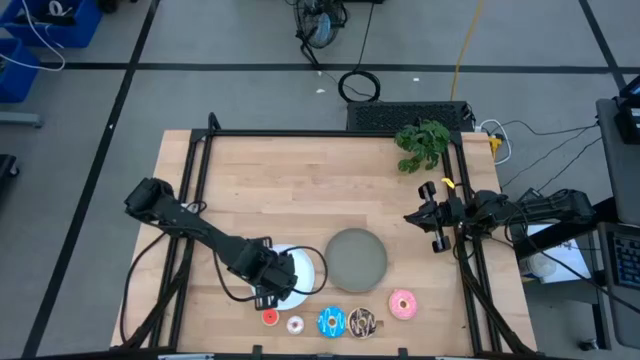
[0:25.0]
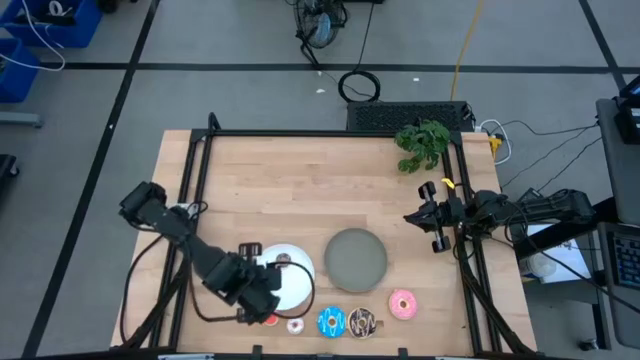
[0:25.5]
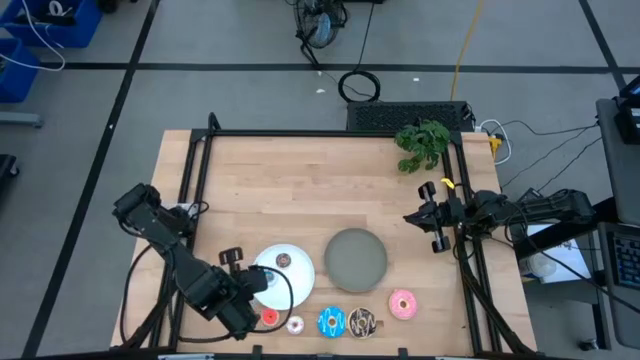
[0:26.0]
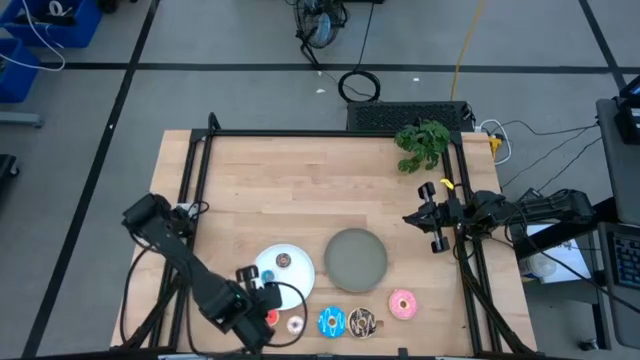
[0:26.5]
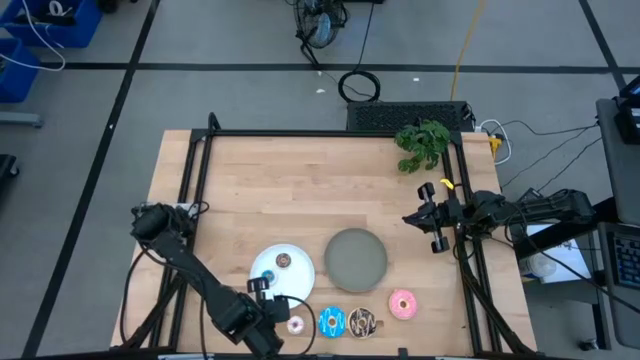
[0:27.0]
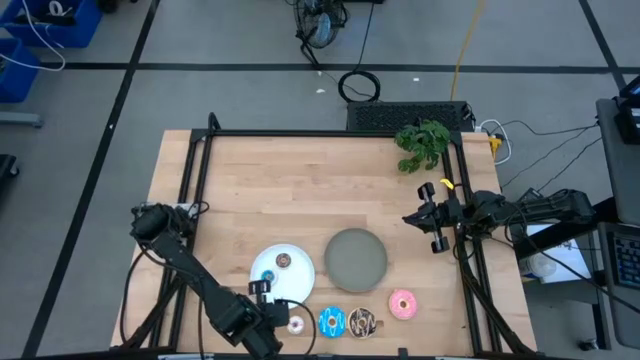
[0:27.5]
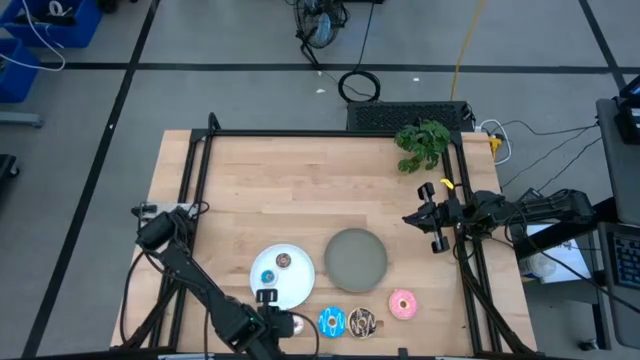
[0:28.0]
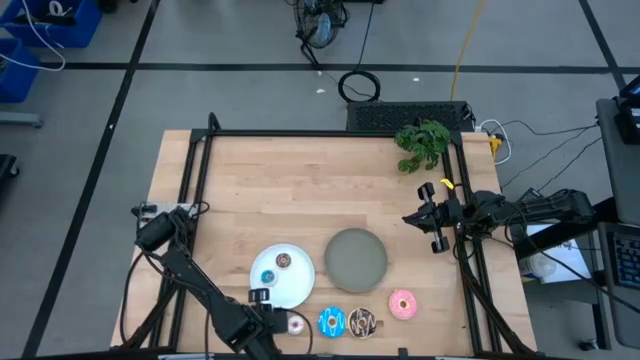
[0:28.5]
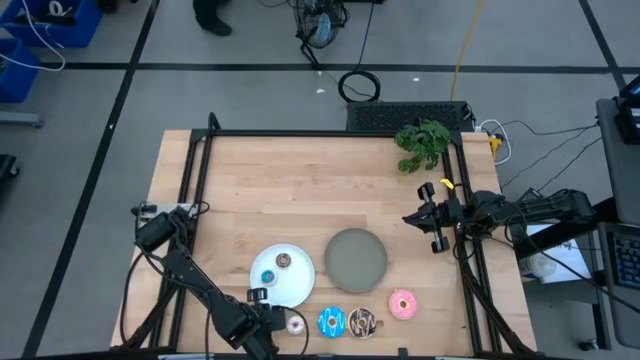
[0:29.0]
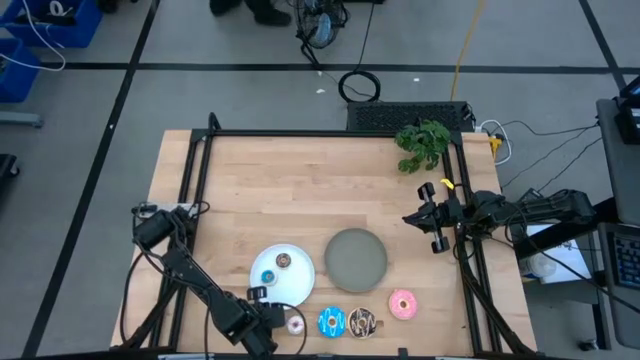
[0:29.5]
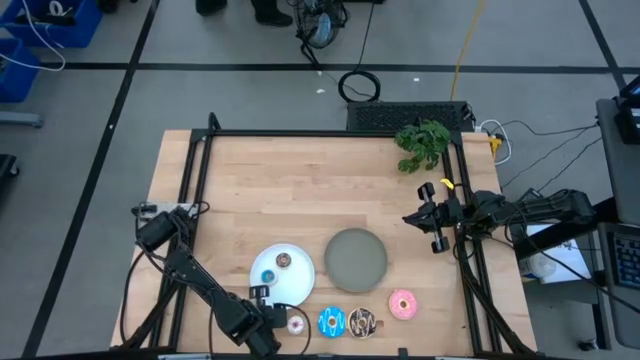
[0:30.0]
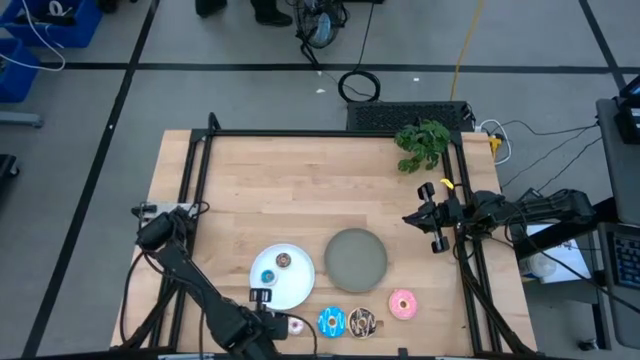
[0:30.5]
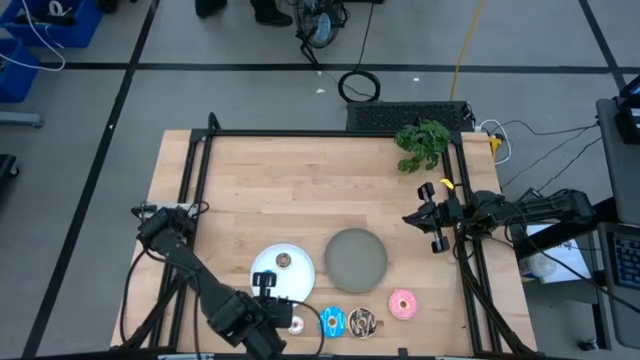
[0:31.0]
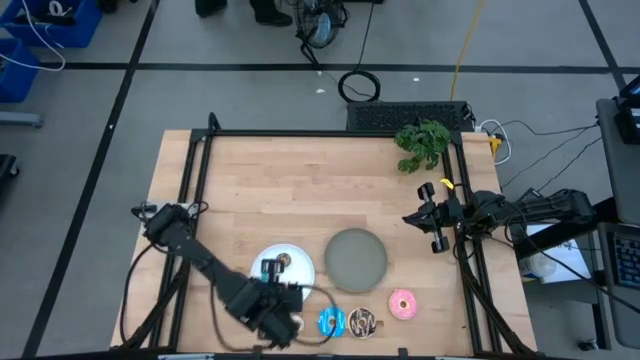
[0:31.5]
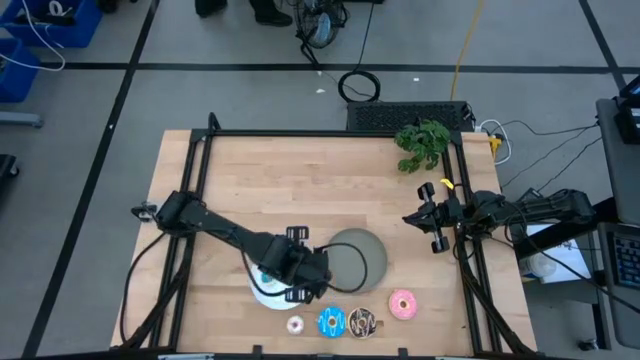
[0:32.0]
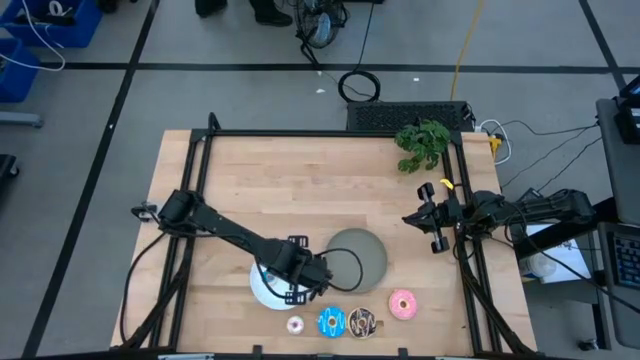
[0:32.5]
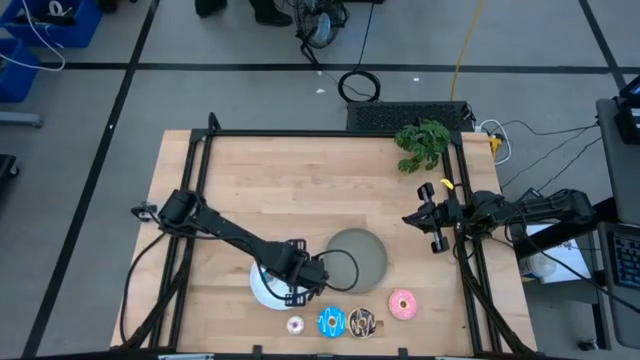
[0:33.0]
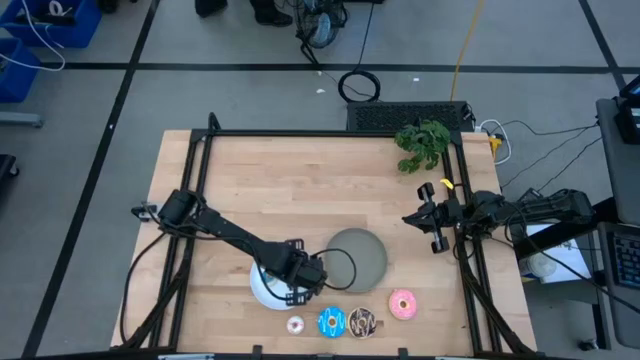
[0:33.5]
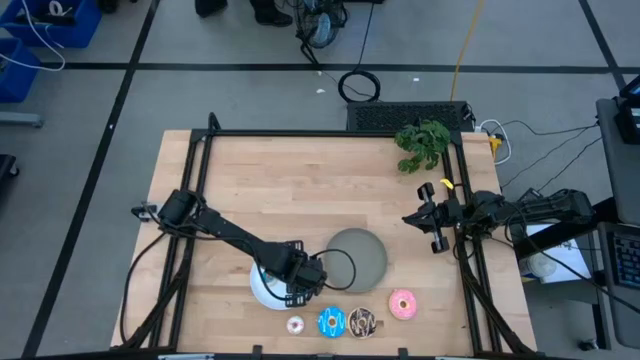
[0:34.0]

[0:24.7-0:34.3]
Task: Pick & Place donuts
Put the small orange donut on the white plate

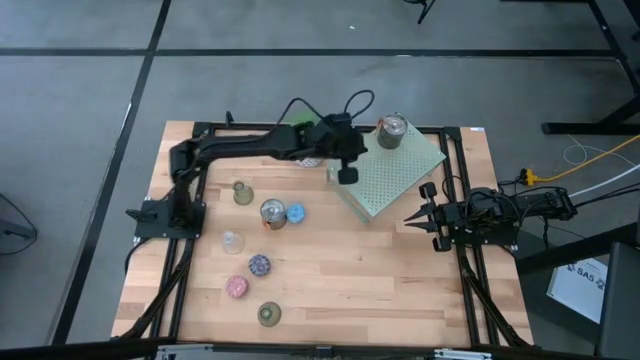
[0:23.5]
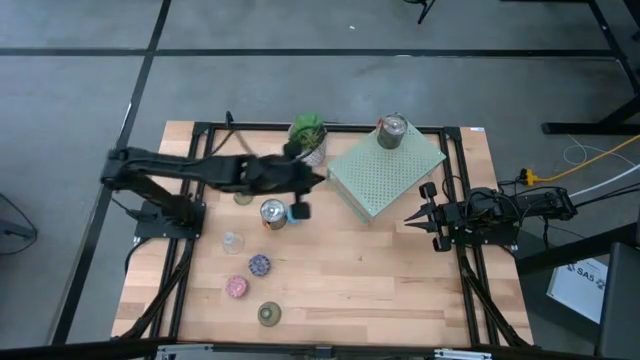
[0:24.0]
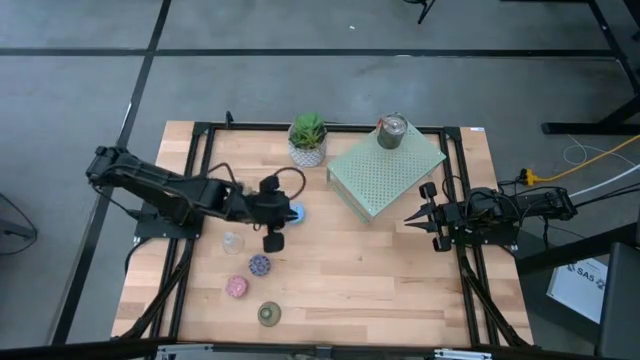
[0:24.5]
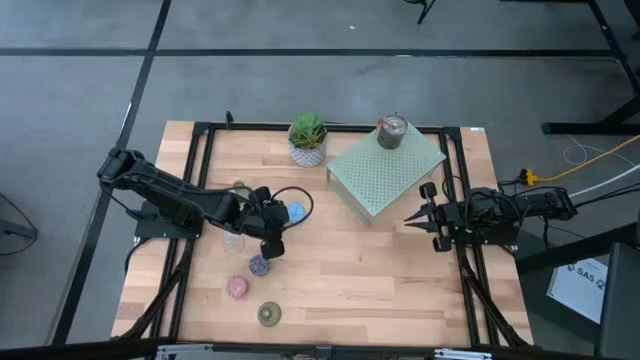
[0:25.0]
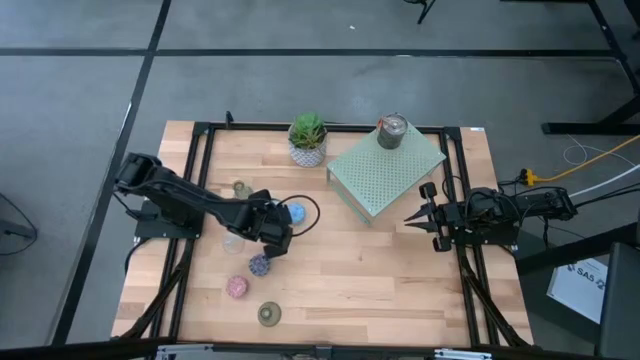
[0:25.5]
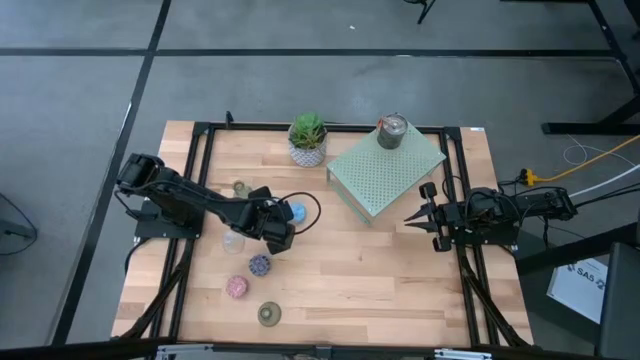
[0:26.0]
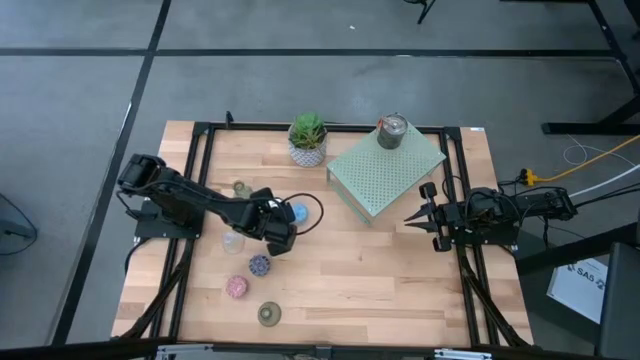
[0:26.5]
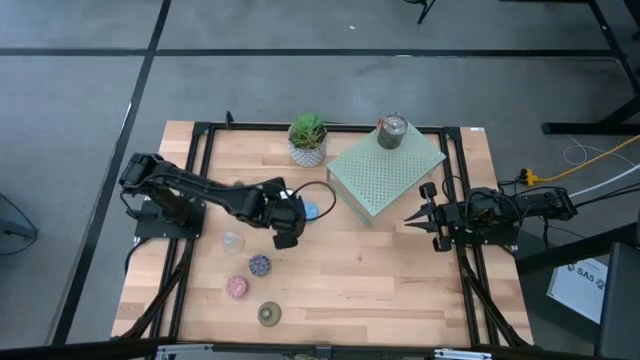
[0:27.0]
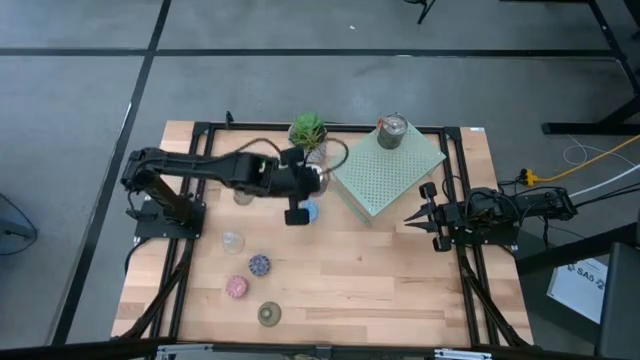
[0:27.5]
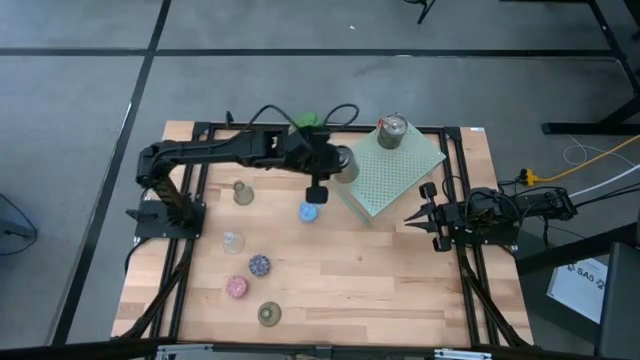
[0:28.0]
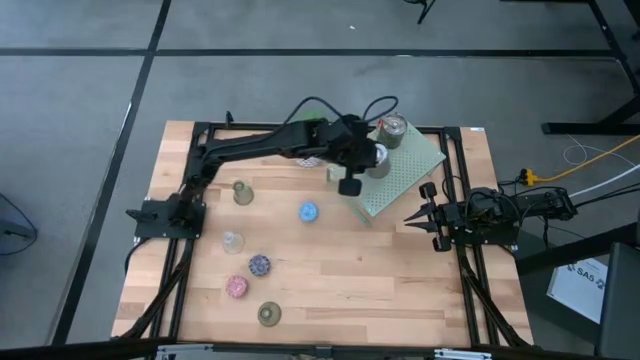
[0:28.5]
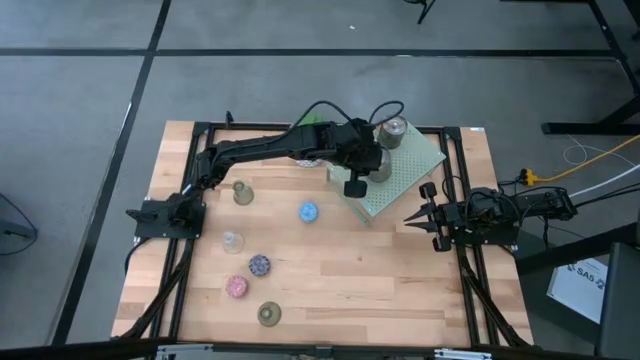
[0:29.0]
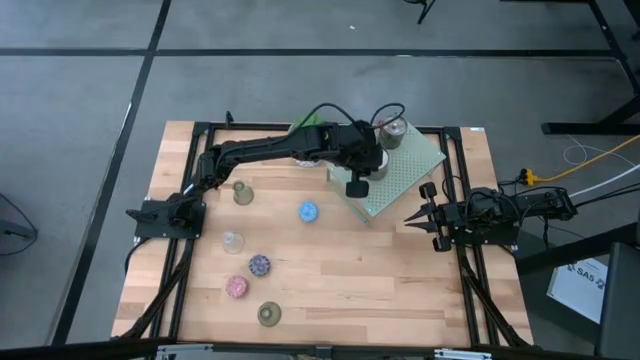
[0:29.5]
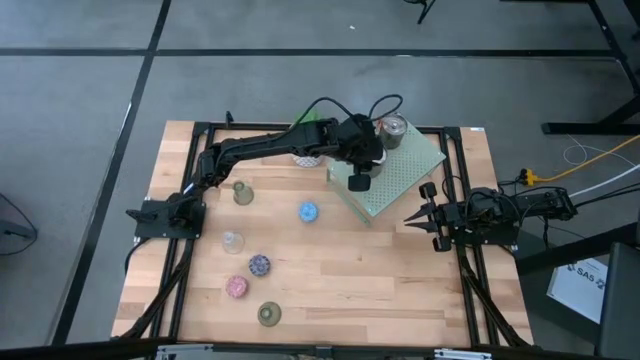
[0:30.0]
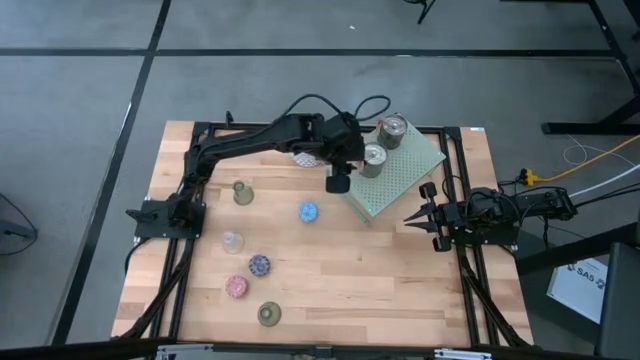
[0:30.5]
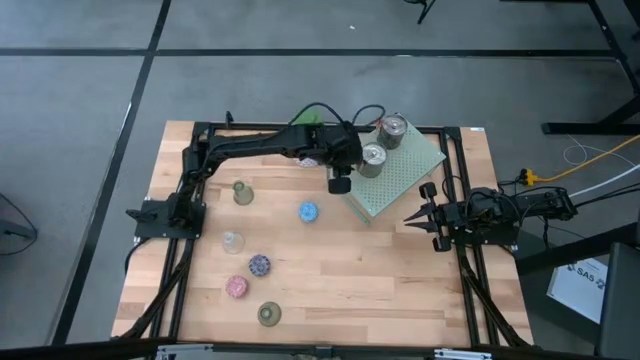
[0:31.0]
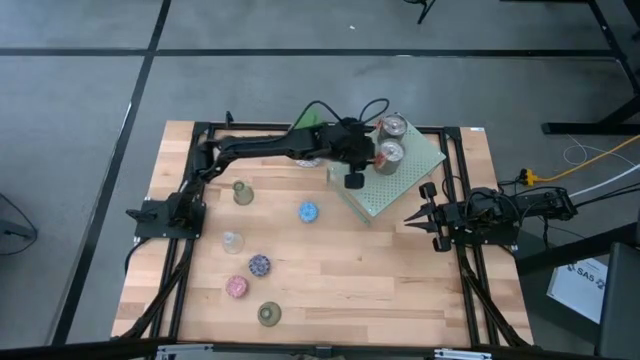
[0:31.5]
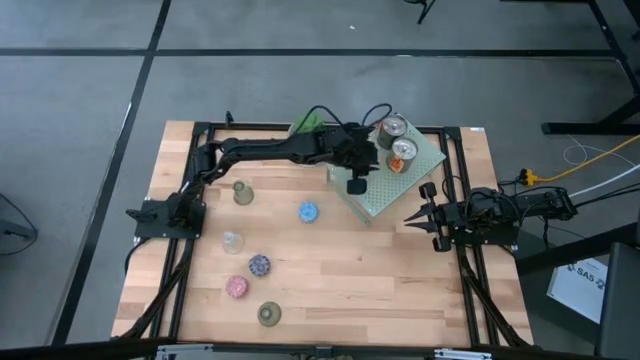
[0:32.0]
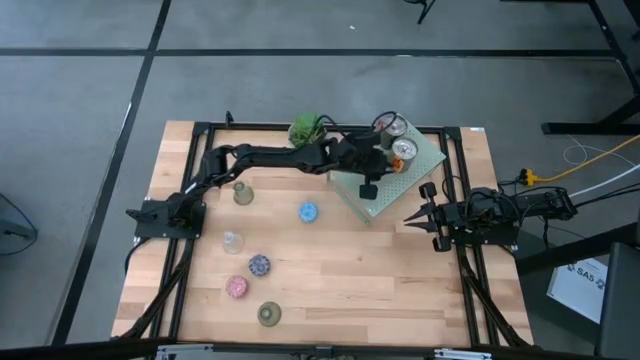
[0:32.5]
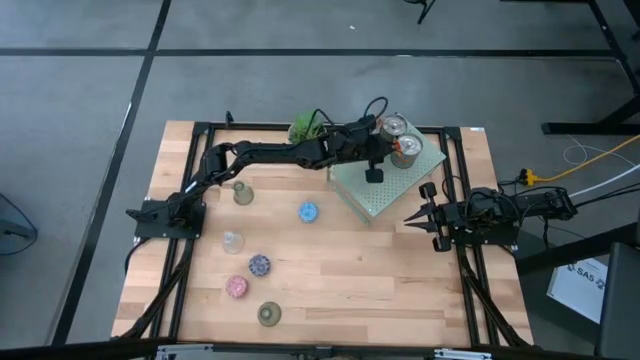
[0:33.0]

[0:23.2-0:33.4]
Task: Pick & Place candle stick holders
Align the silver scented candle with the other silver scented candle on the shelf
